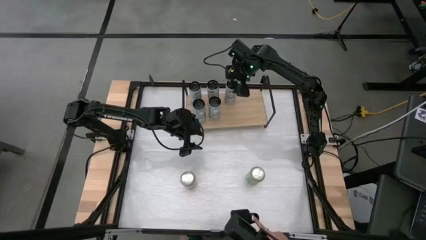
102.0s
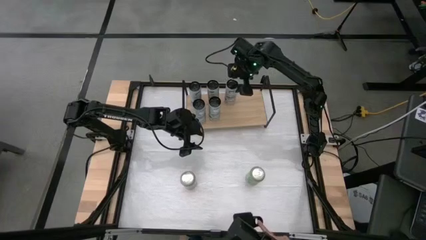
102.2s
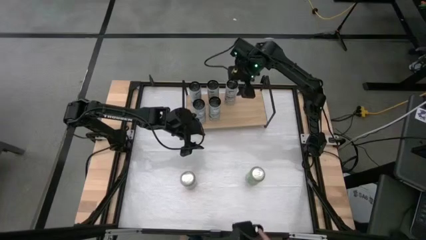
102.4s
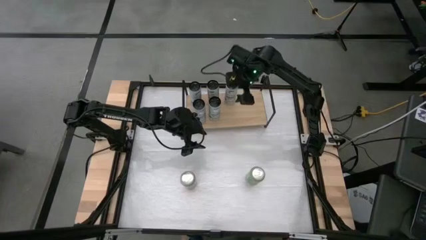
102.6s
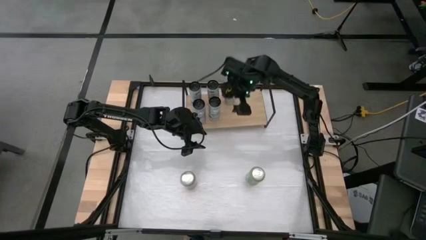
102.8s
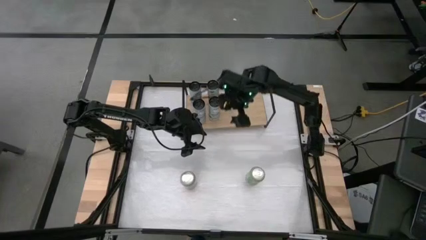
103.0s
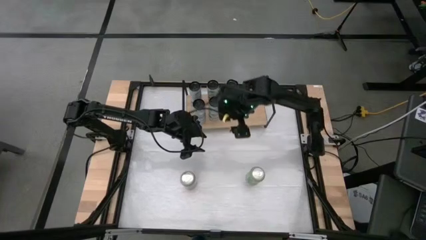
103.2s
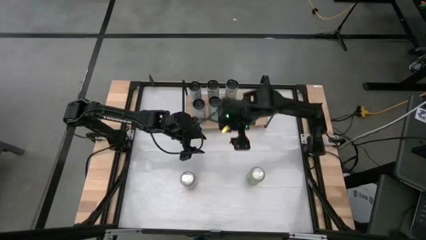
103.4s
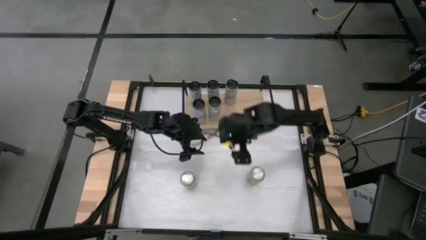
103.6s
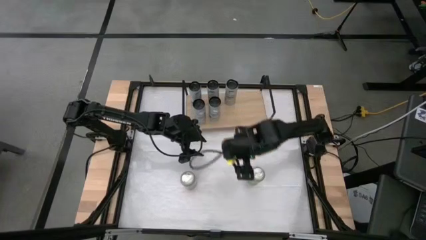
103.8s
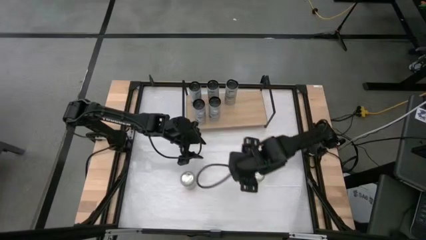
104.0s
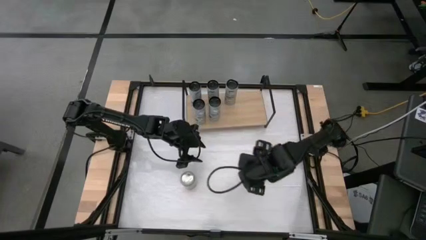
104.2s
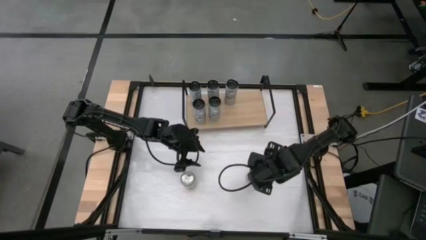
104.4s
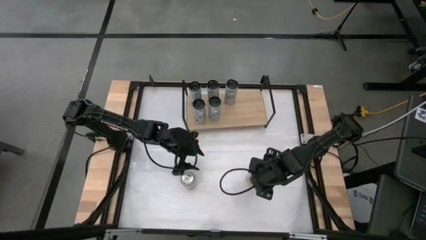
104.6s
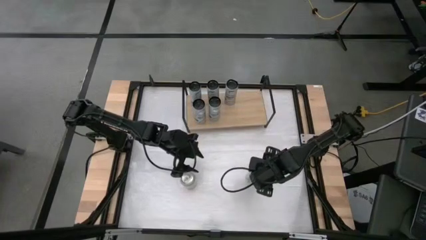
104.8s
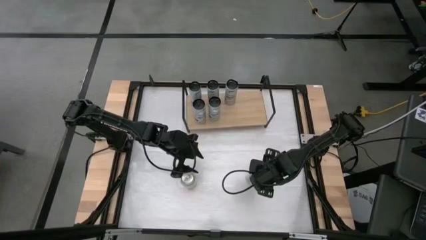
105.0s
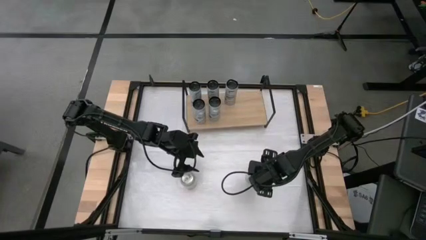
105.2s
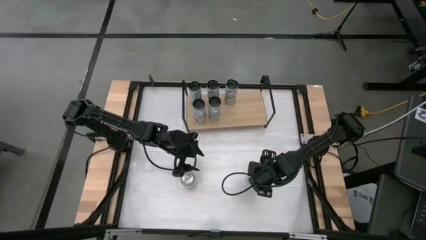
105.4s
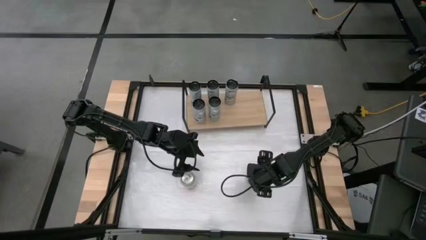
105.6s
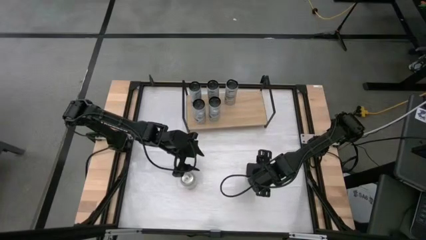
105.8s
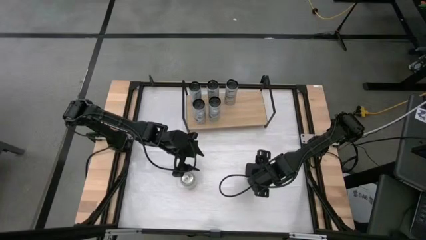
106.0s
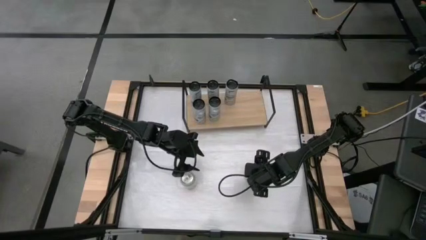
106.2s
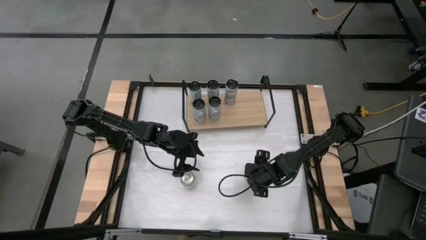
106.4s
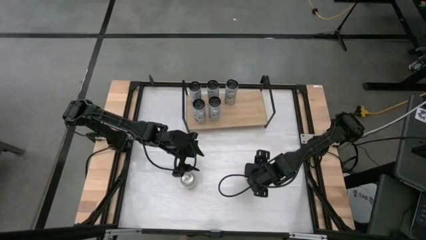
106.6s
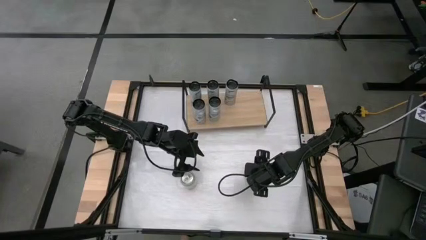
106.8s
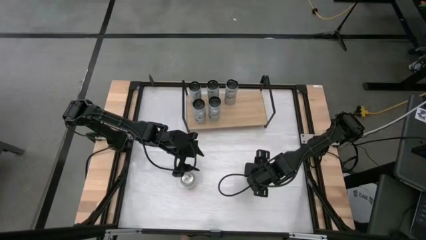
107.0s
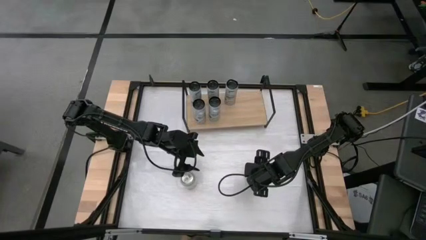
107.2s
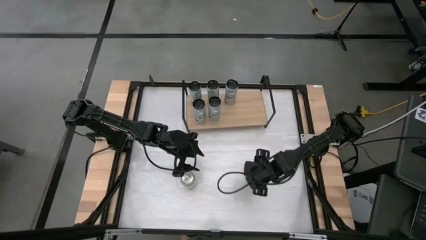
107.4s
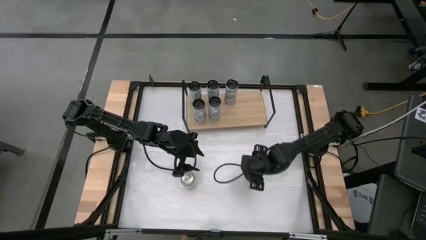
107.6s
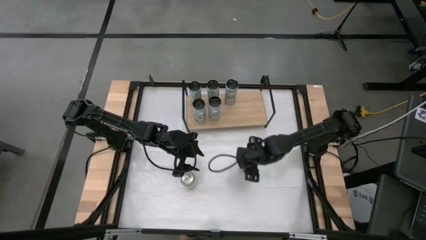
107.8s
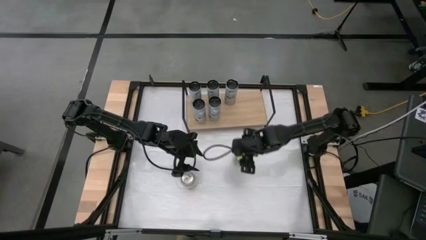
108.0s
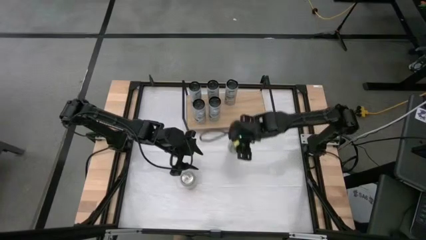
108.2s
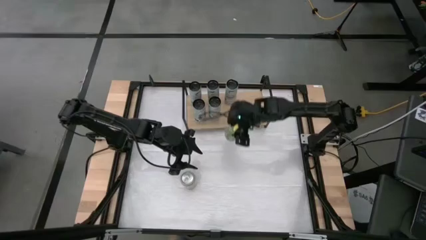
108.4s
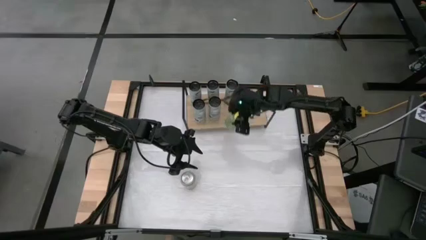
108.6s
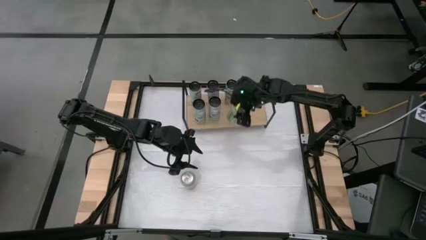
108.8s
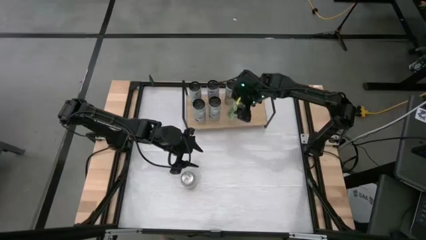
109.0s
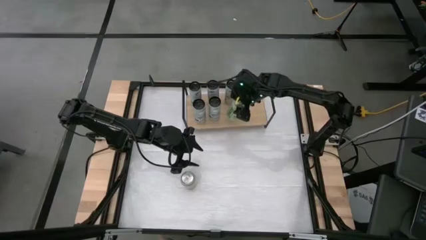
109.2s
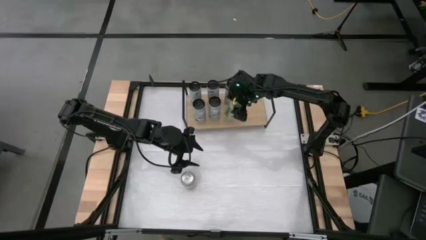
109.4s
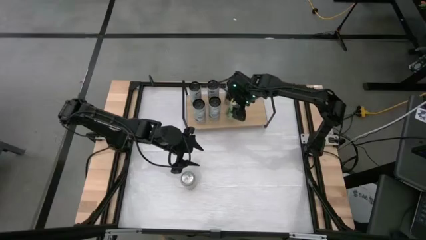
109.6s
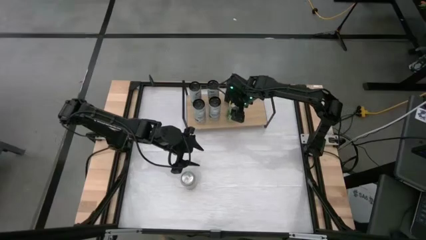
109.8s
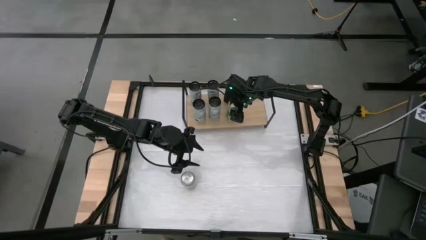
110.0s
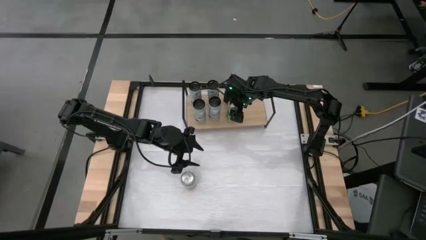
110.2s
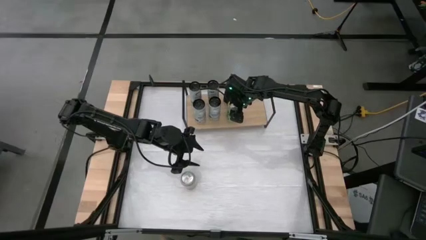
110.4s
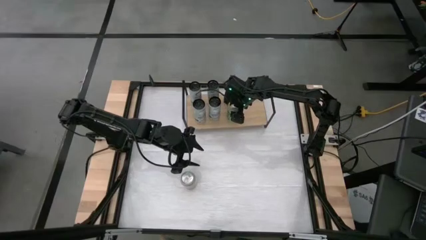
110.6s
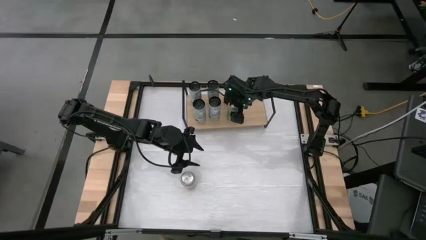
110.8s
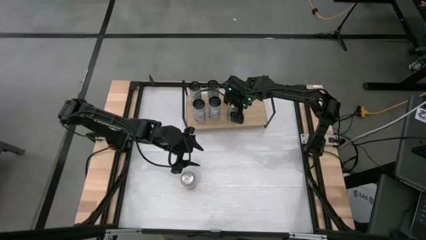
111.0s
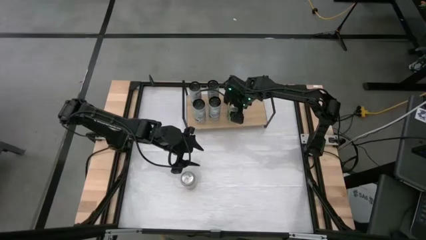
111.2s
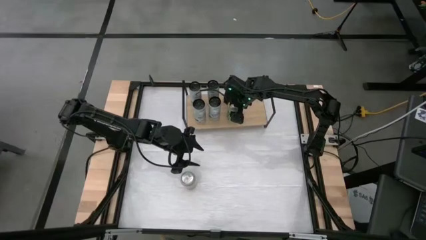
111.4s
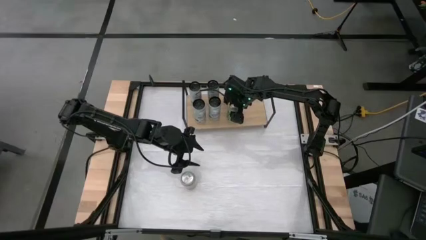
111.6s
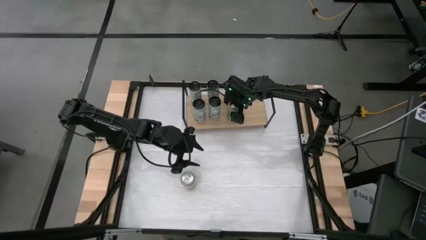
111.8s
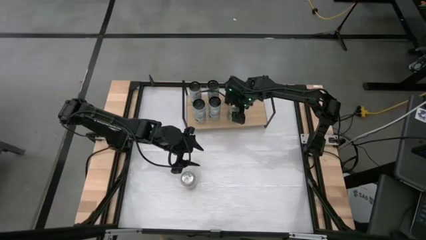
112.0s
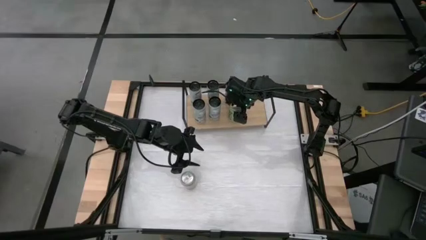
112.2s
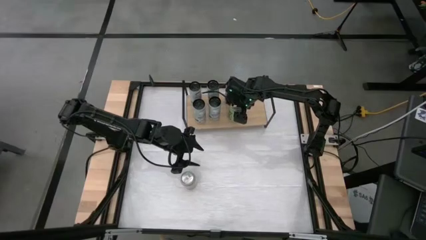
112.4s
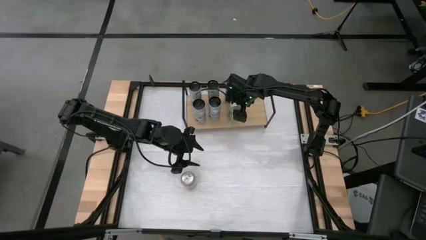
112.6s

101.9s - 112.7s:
Task: Place canned beverage on shelf
Put the green soda can on the shelf

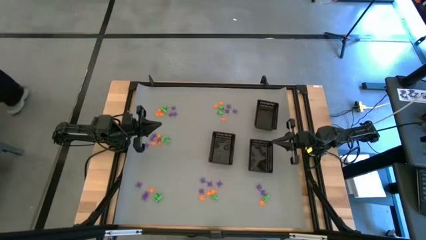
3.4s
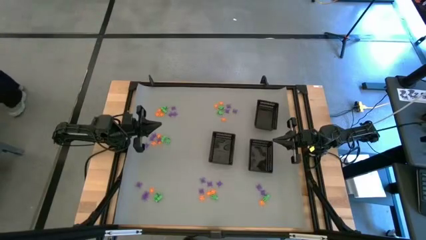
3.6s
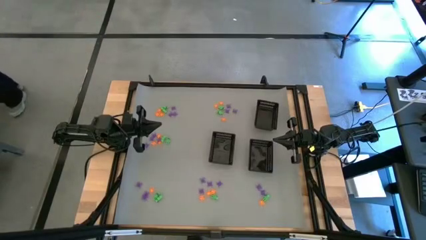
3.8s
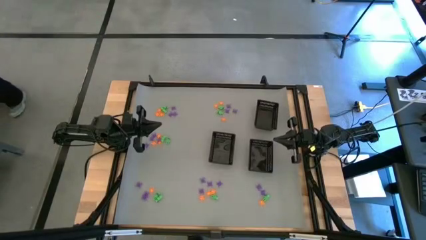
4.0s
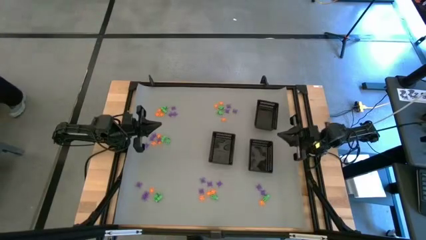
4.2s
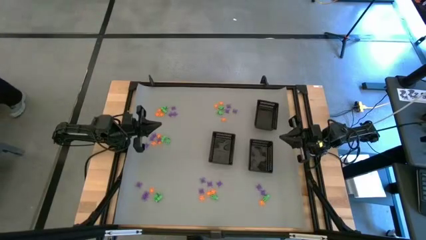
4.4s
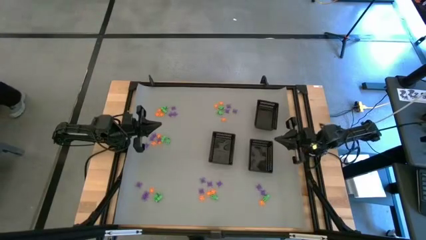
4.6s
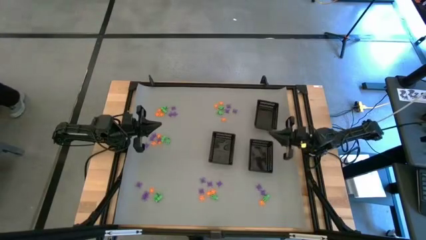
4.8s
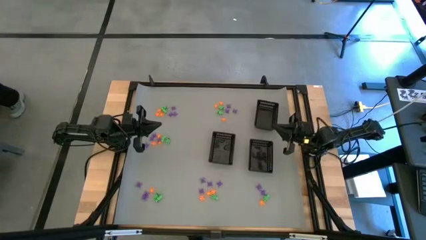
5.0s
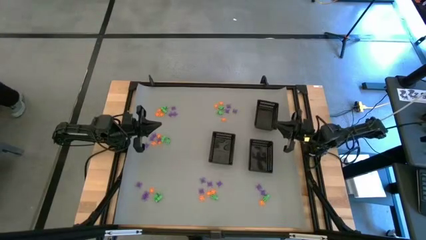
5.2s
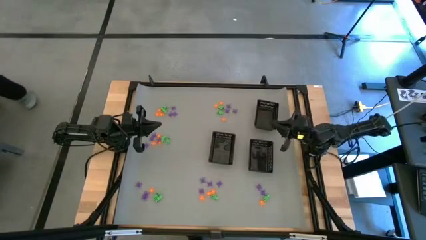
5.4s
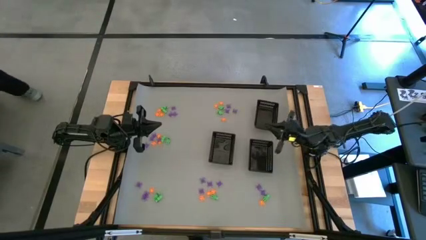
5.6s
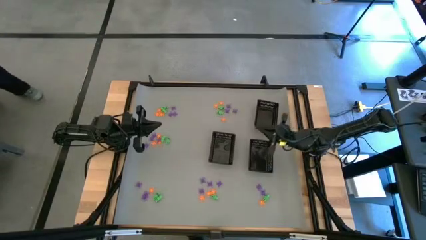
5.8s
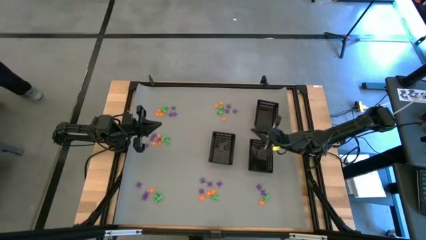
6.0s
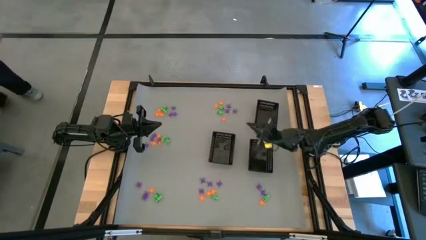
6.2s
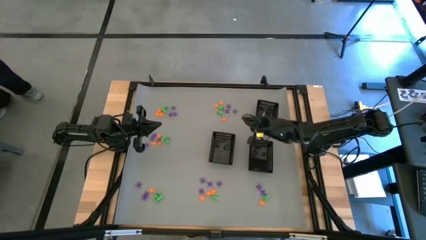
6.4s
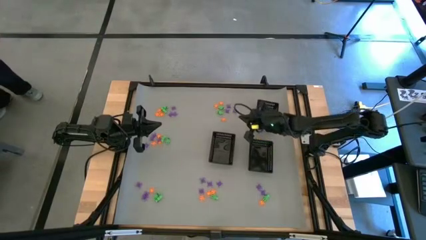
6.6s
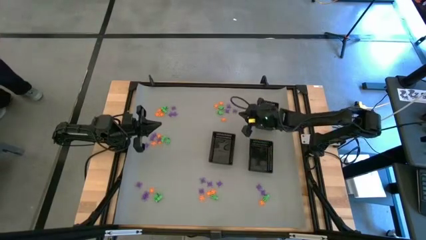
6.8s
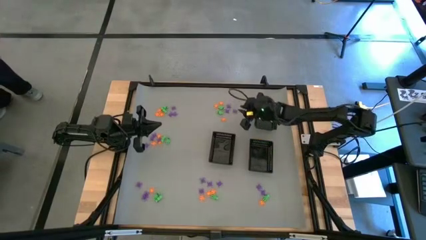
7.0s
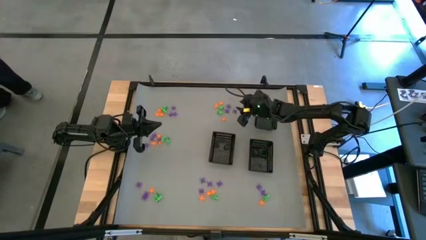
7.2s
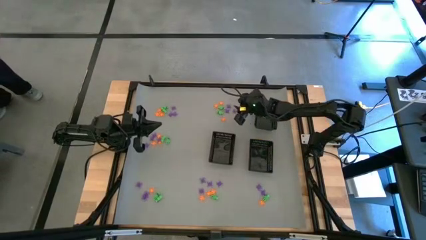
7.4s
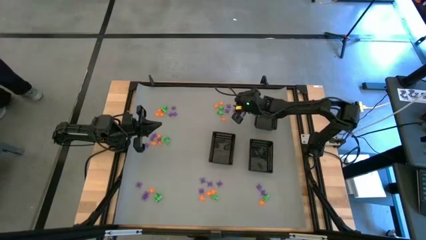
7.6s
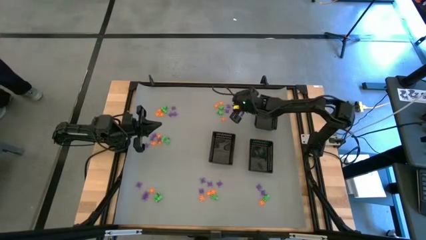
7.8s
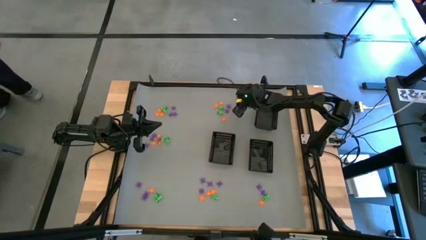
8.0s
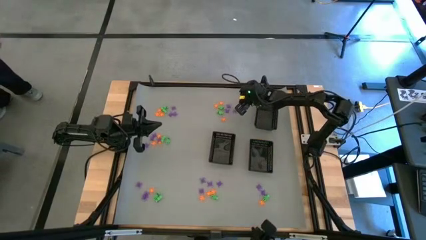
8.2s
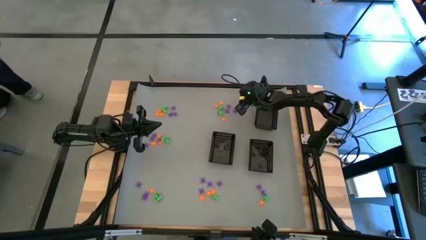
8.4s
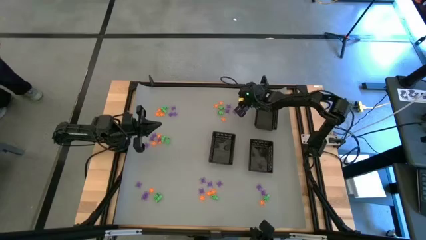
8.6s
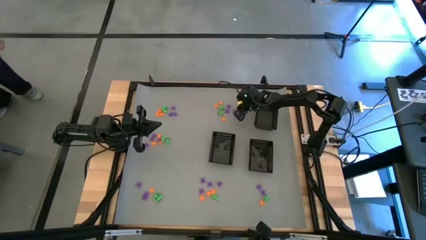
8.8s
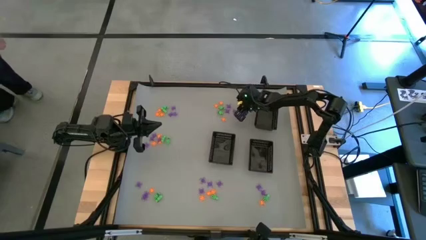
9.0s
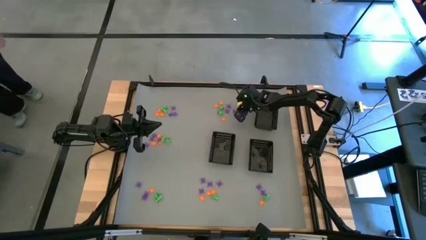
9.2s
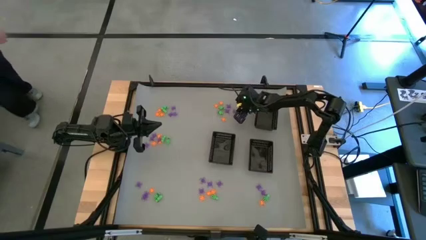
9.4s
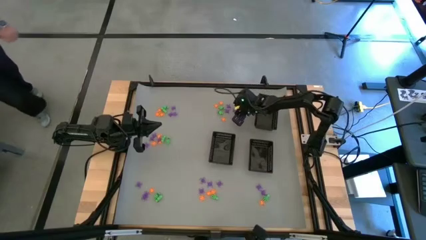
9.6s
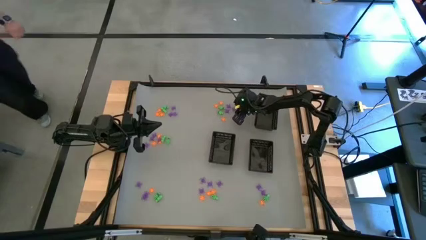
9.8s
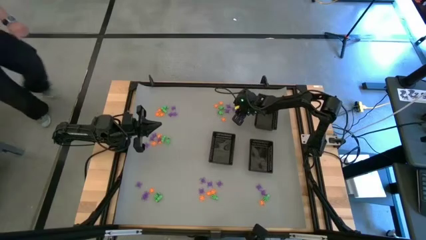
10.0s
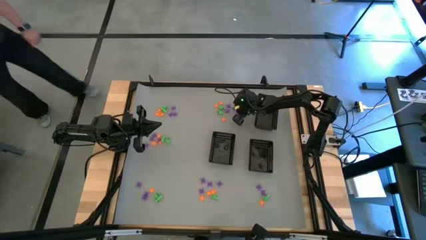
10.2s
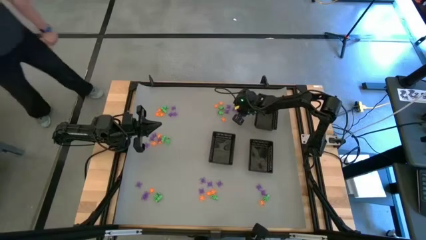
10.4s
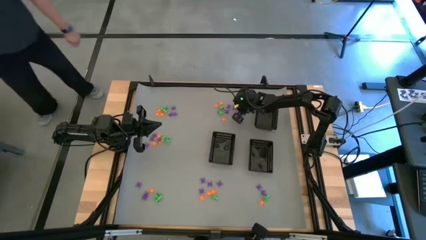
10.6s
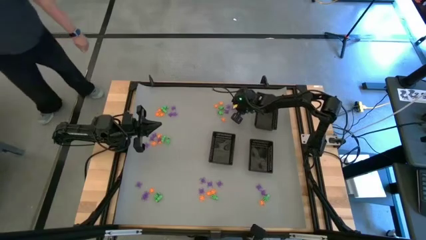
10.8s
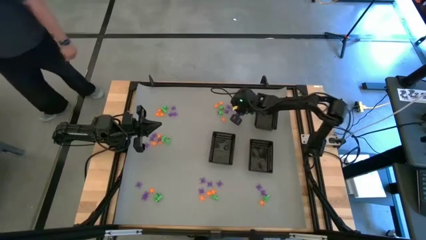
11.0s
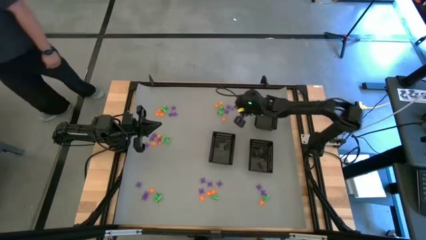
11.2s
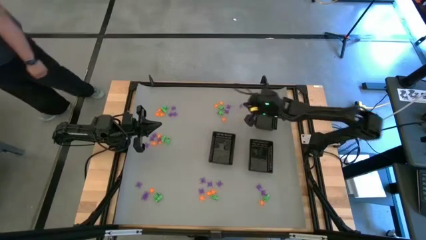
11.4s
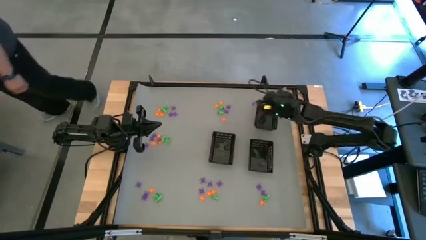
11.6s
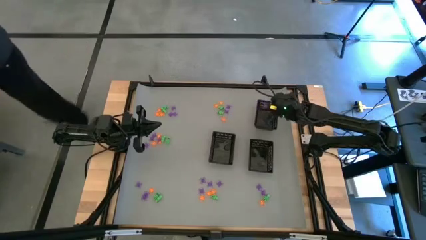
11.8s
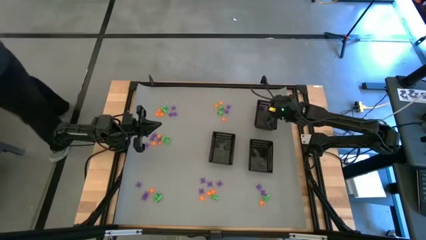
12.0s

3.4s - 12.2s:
Task: Sort Halloween decoration
Put the purple spider toy into the top bin
